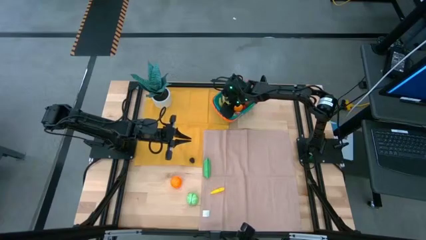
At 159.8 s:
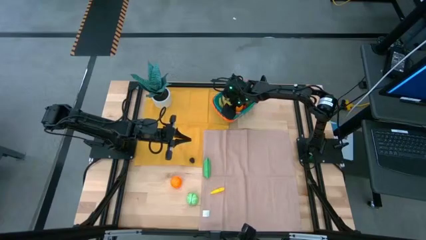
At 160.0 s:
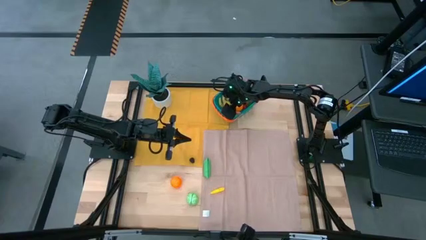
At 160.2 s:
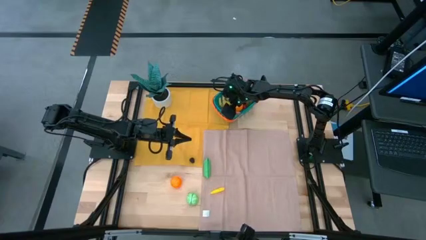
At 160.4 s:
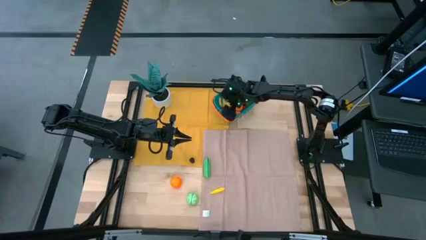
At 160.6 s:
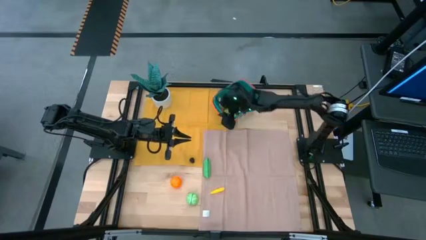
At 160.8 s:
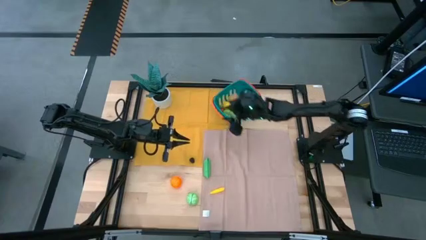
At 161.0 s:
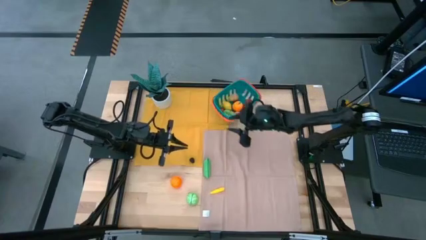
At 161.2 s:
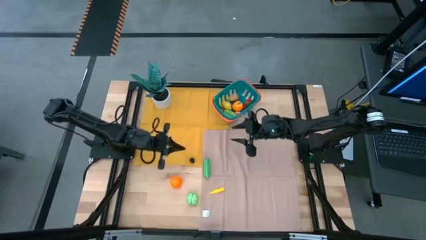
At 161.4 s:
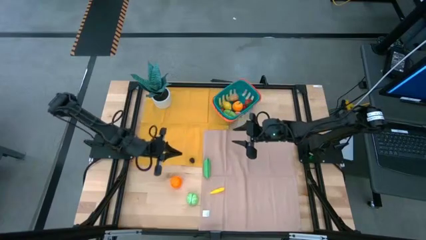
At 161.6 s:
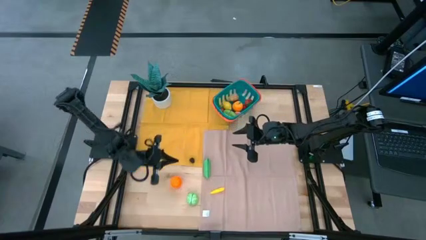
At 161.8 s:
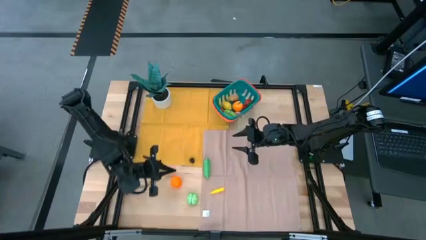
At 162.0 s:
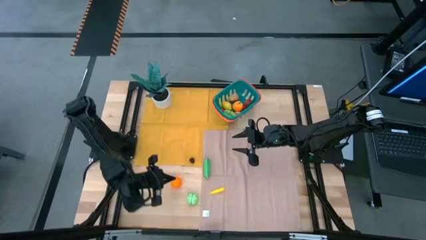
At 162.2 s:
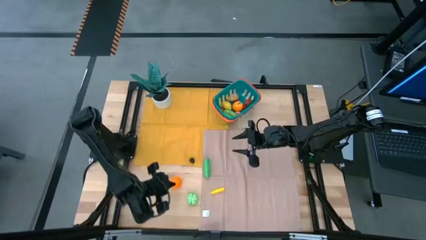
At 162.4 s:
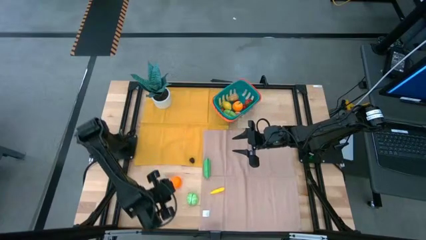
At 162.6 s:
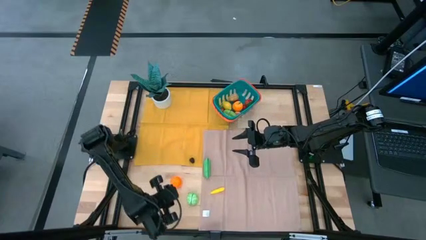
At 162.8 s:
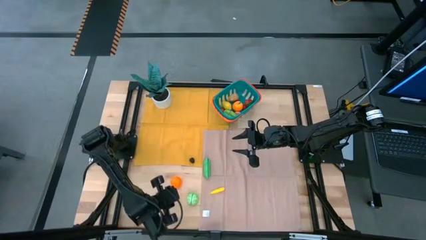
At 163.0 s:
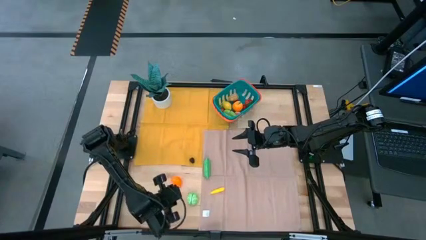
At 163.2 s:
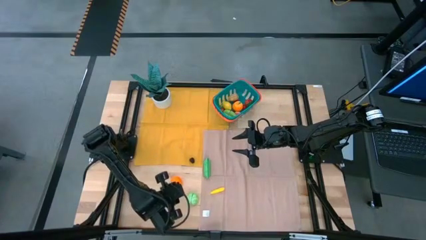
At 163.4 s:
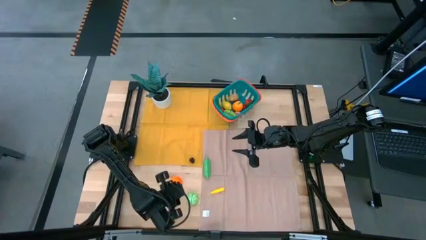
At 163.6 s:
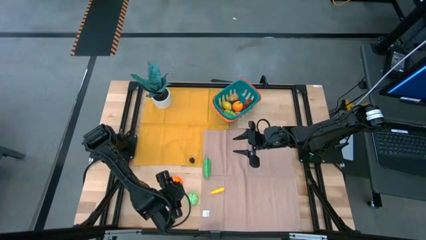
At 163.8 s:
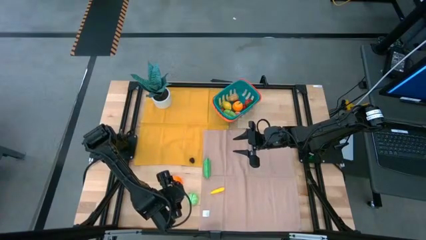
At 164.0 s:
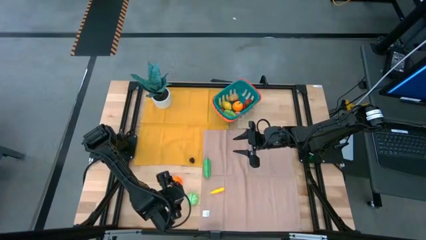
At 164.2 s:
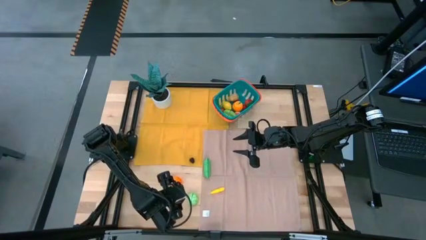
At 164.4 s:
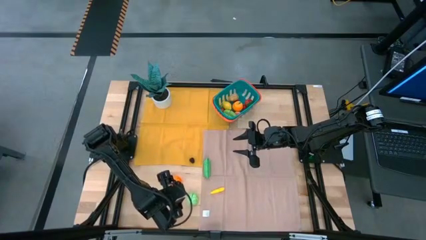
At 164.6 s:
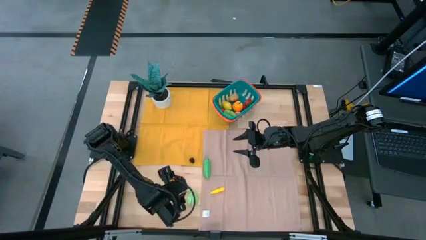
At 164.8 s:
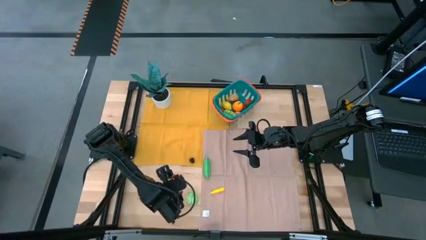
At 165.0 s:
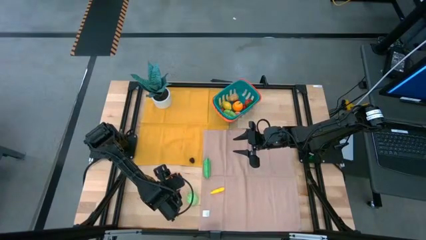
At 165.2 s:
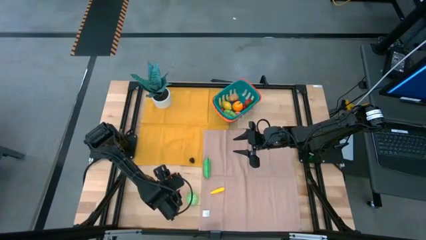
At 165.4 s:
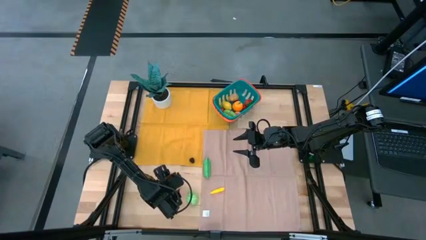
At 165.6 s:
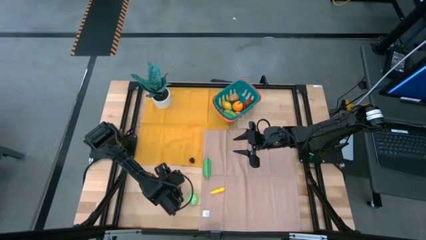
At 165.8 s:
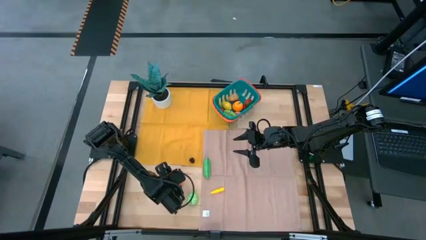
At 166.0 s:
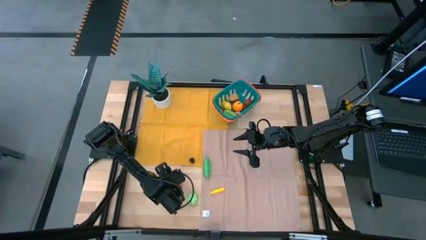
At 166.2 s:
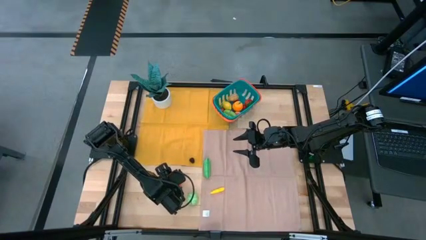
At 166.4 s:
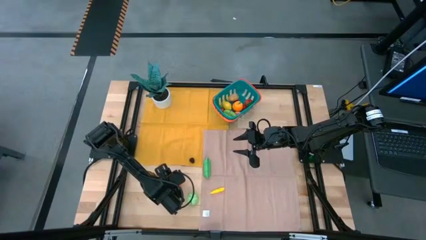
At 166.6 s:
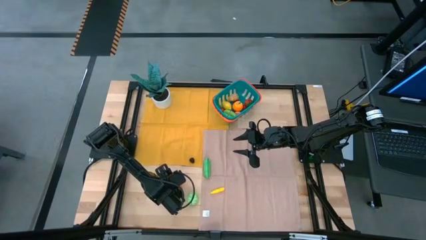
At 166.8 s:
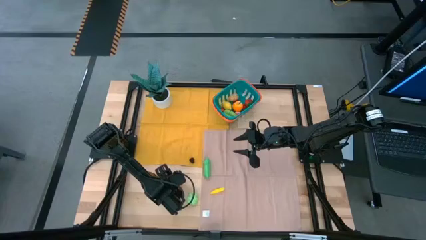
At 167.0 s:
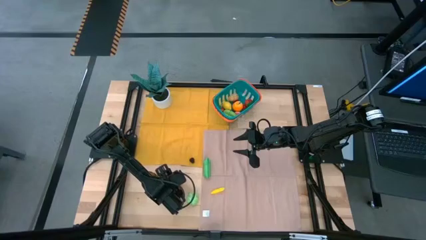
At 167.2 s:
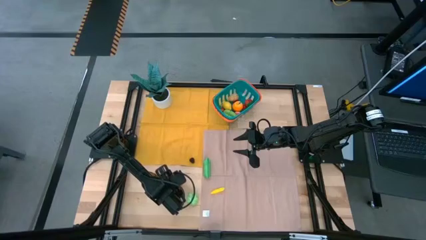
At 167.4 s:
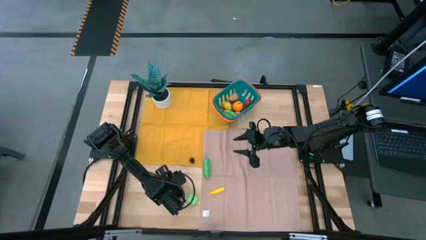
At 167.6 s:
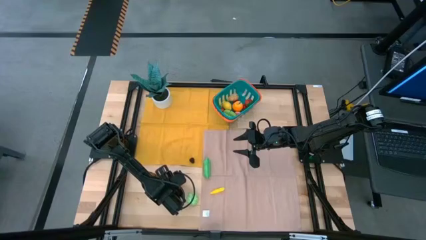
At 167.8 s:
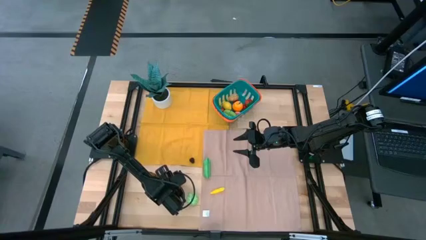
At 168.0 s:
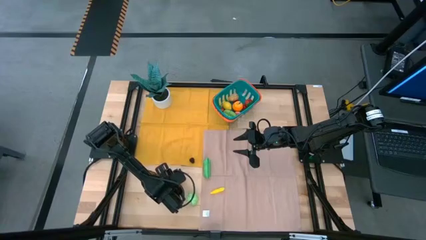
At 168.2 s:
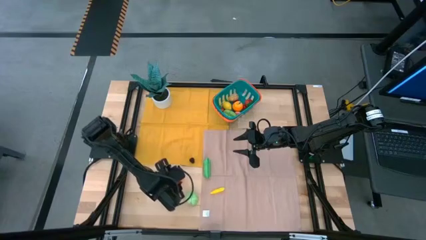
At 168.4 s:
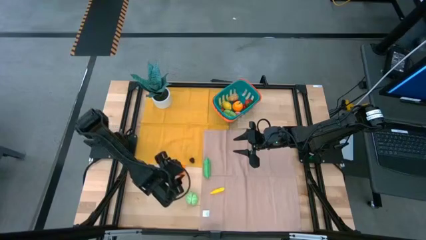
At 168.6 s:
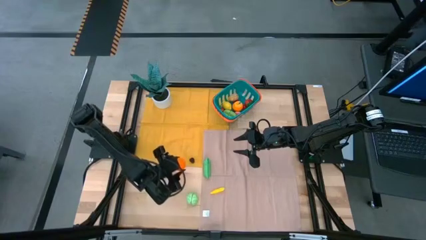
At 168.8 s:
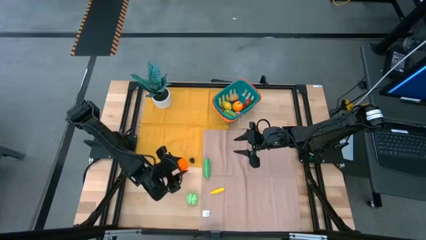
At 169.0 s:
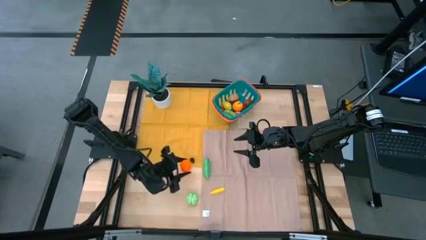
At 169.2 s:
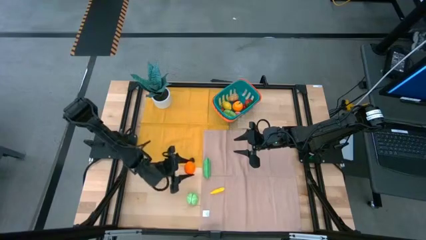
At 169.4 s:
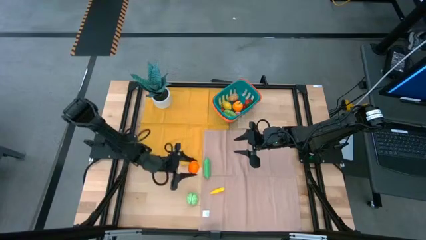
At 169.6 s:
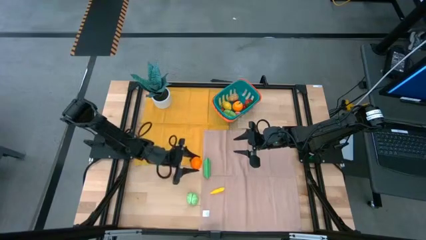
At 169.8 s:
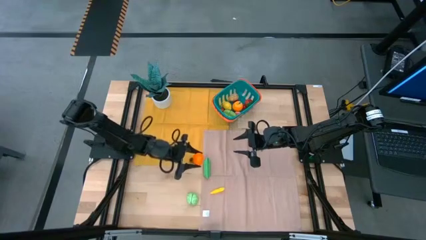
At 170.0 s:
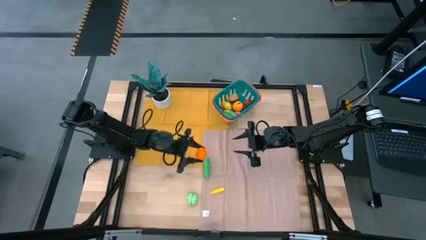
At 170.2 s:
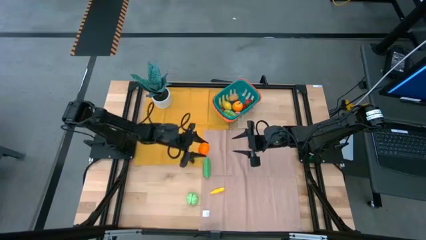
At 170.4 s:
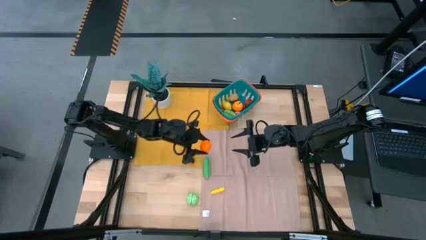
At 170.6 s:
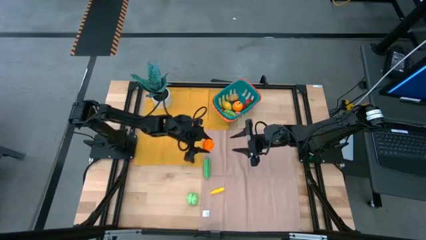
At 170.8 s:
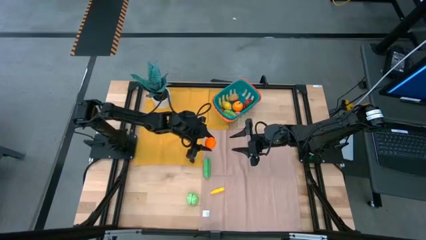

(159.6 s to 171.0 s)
Task: Pick and placing Produce into tupperware
Put the tangerine into the basket

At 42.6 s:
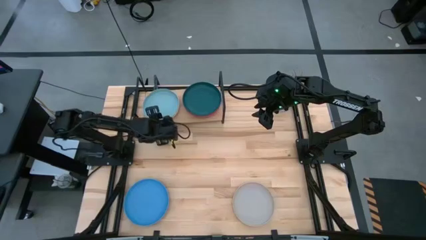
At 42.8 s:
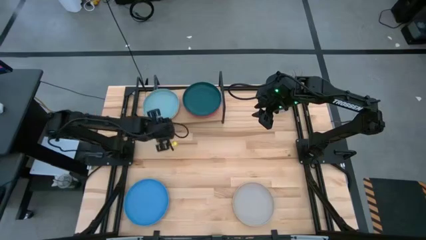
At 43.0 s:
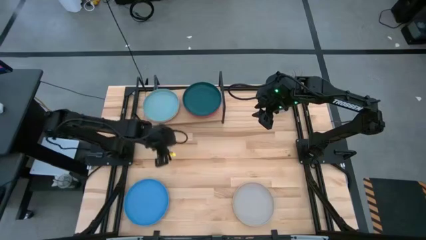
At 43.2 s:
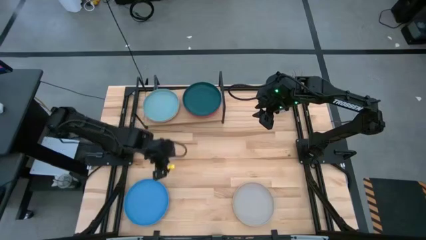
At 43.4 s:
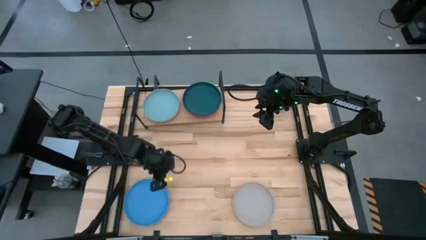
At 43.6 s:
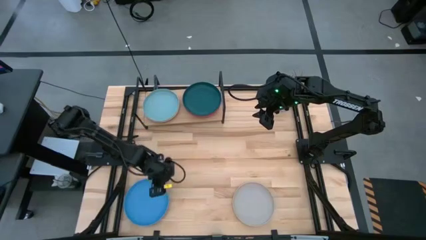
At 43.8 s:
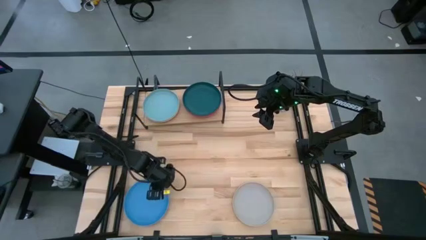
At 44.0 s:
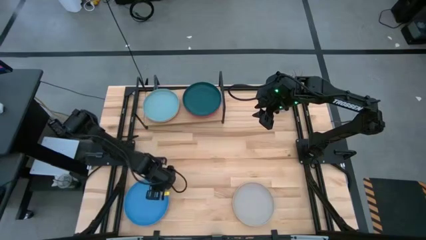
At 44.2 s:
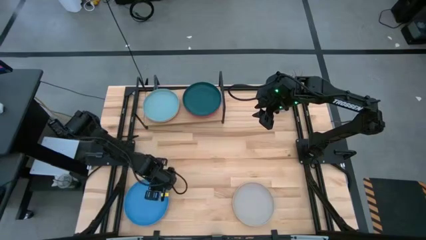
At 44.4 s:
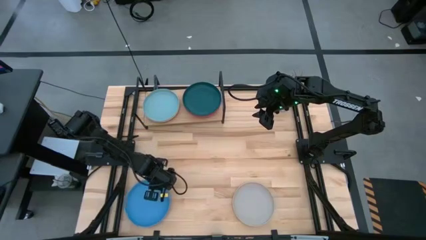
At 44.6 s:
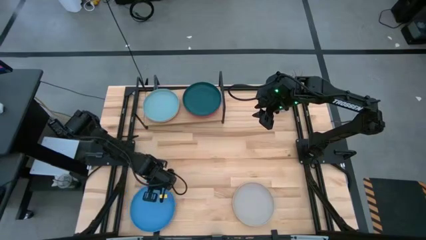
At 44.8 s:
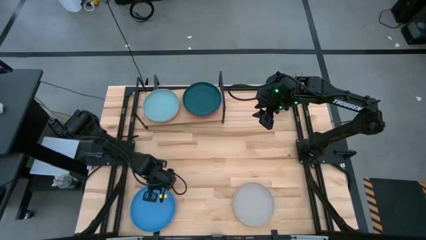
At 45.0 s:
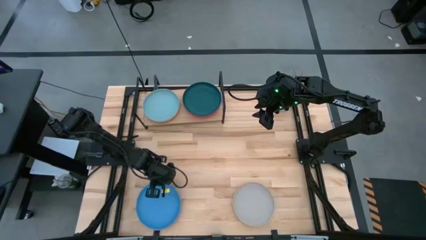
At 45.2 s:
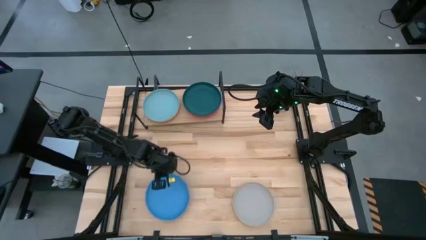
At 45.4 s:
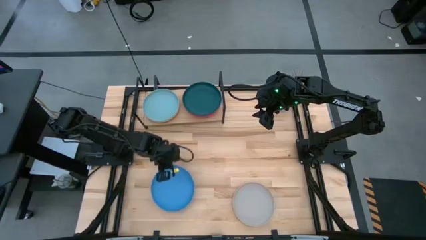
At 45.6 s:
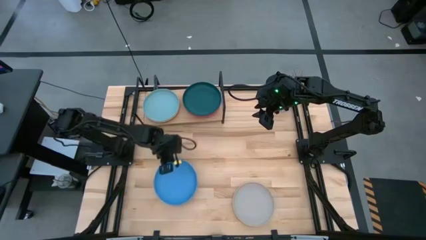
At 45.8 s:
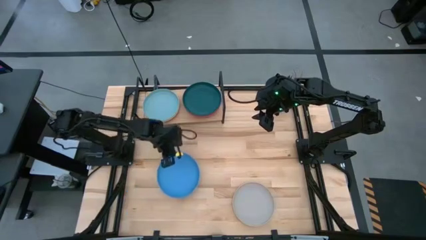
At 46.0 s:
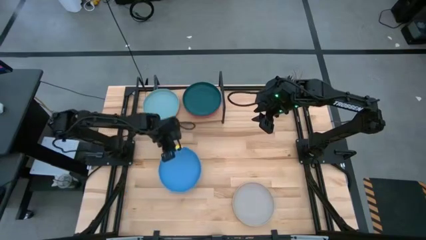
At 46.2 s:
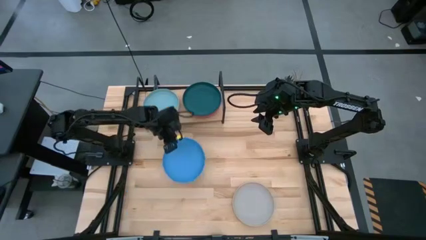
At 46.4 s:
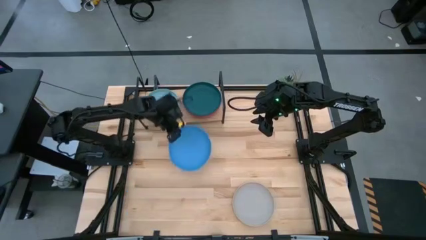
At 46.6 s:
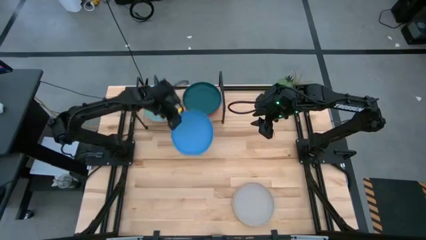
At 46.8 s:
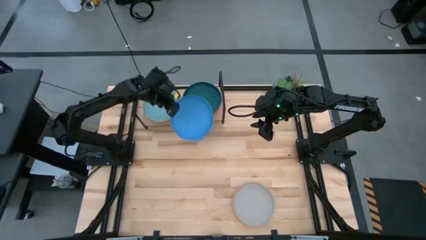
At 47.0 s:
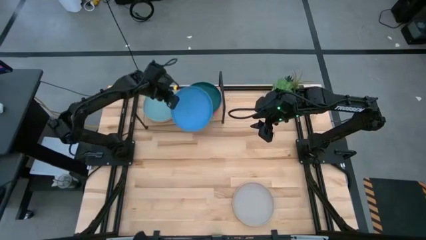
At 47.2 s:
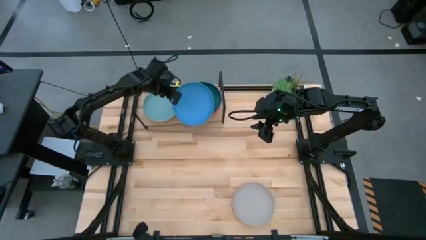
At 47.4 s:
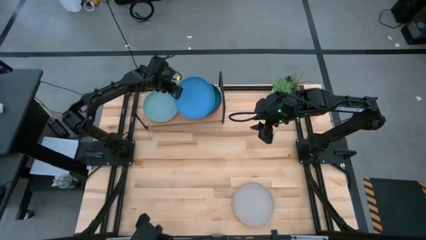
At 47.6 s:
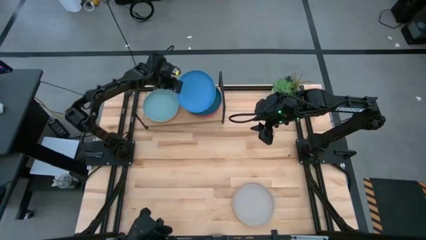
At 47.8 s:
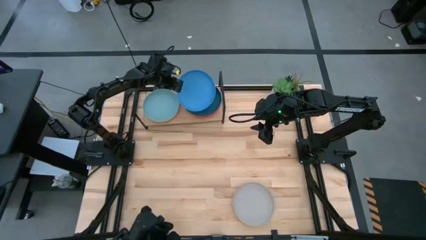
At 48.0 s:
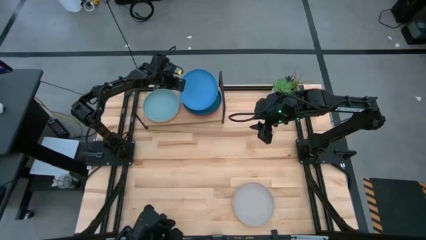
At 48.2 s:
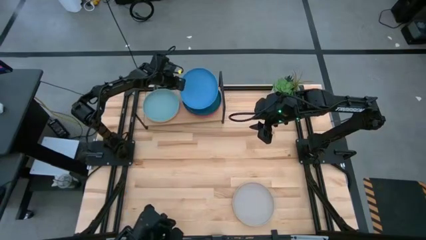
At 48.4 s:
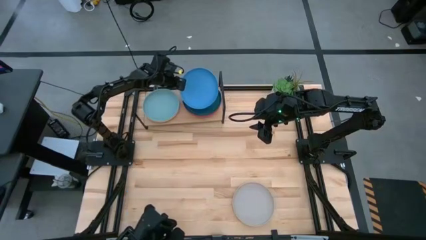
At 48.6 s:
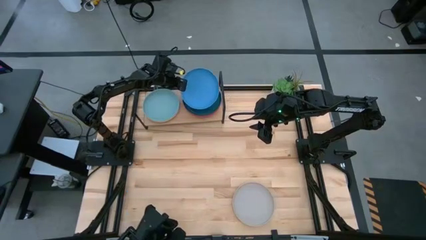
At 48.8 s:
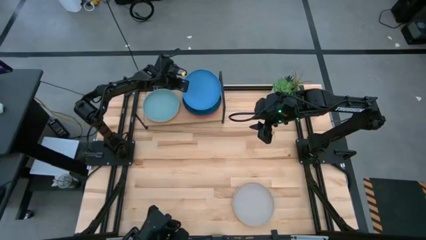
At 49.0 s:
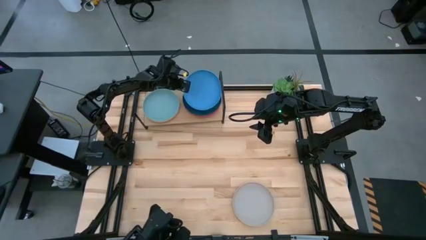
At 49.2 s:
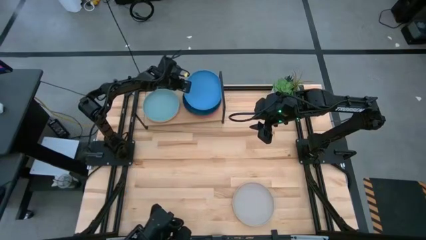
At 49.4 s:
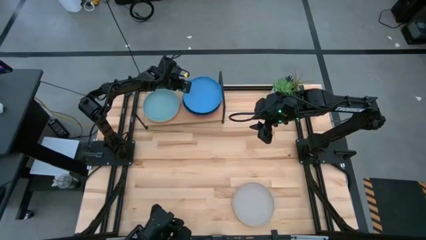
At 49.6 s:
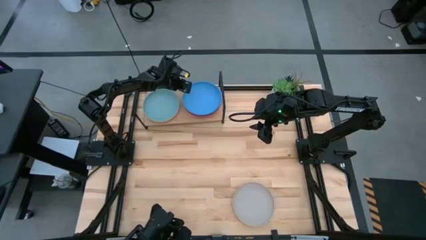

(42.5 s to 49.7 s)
Task: Place and stack plates onto a shelf
Stack the blue plate on top of the dark green plate on the shelf
